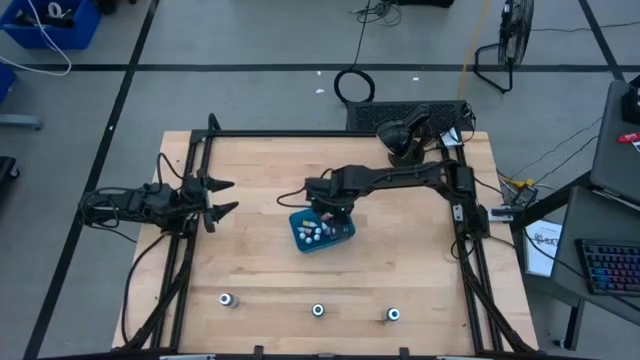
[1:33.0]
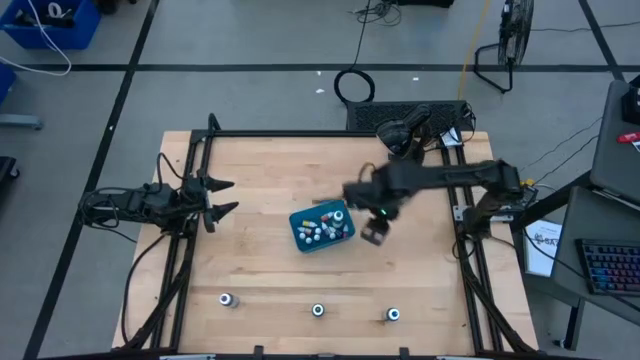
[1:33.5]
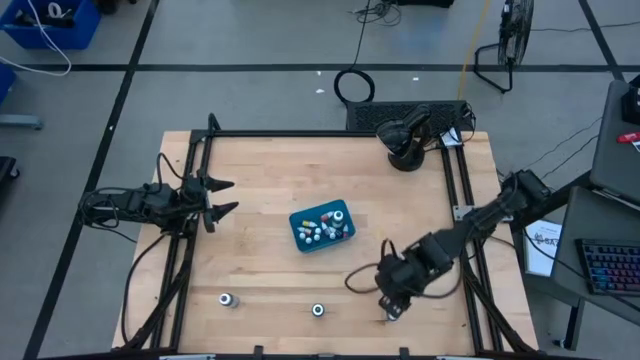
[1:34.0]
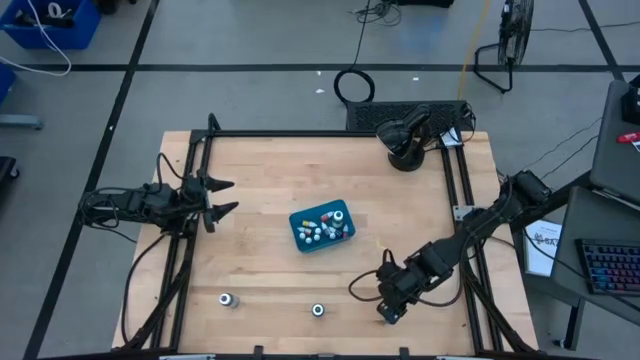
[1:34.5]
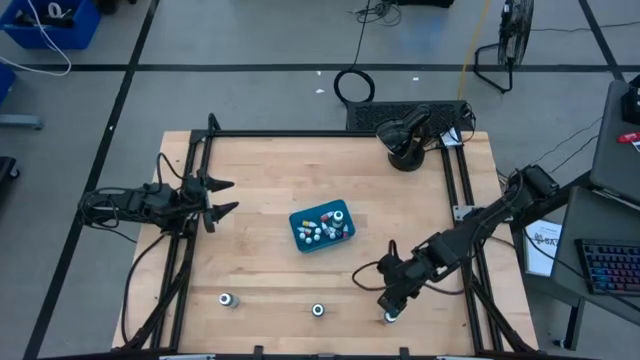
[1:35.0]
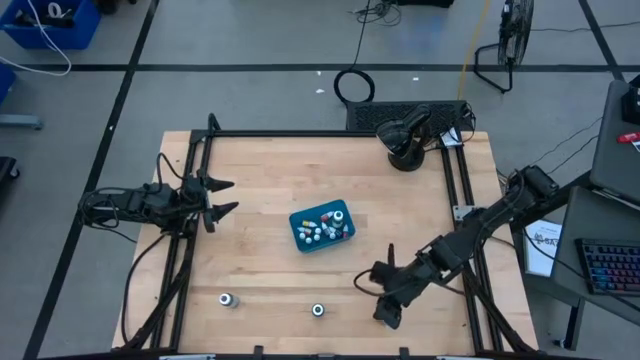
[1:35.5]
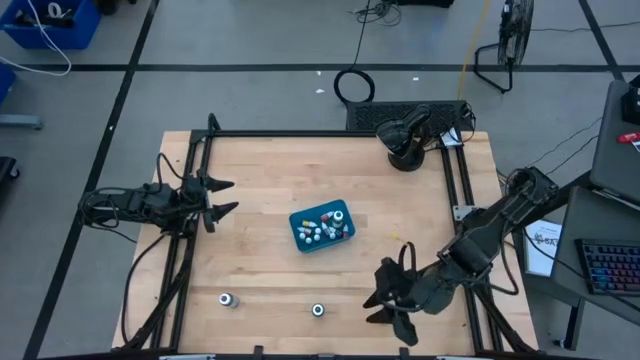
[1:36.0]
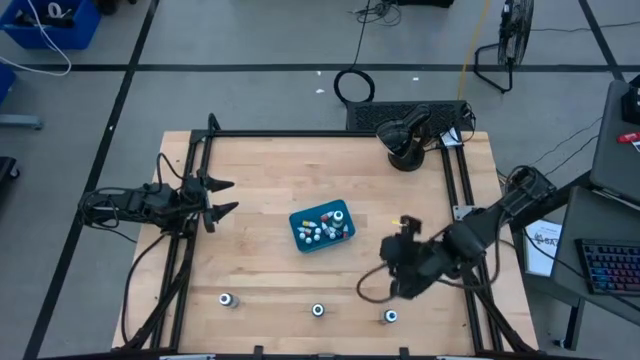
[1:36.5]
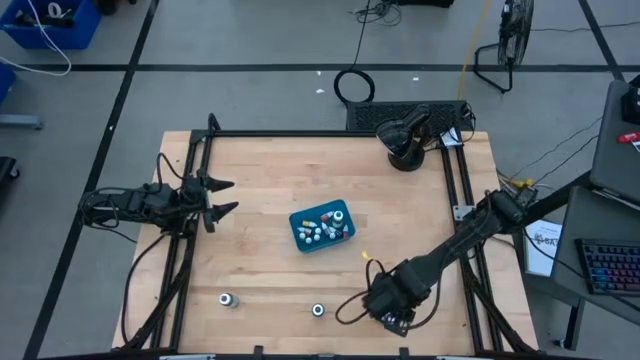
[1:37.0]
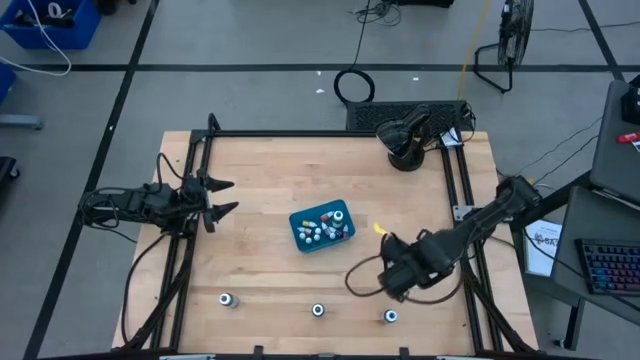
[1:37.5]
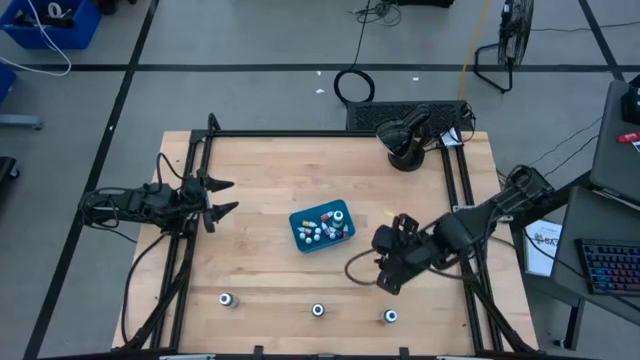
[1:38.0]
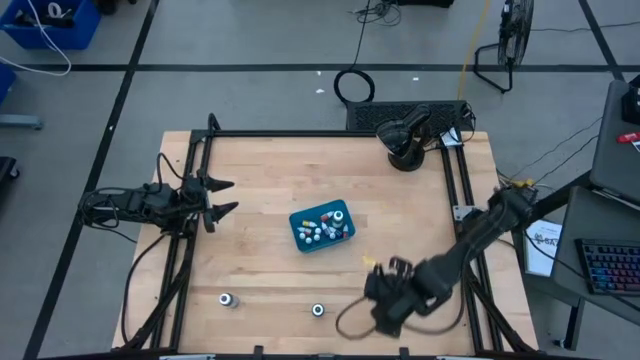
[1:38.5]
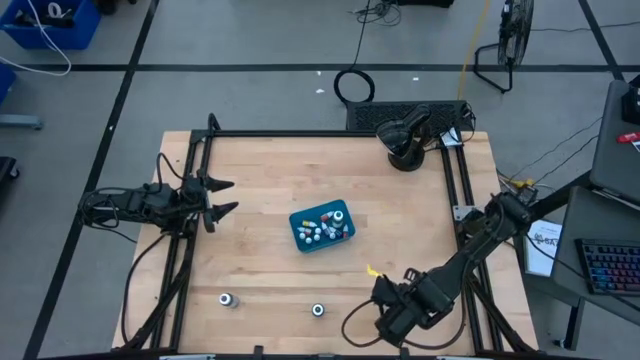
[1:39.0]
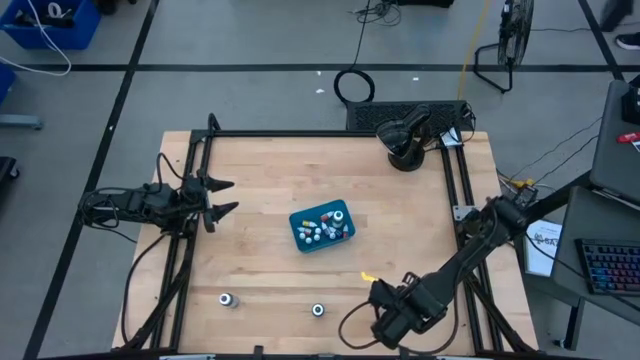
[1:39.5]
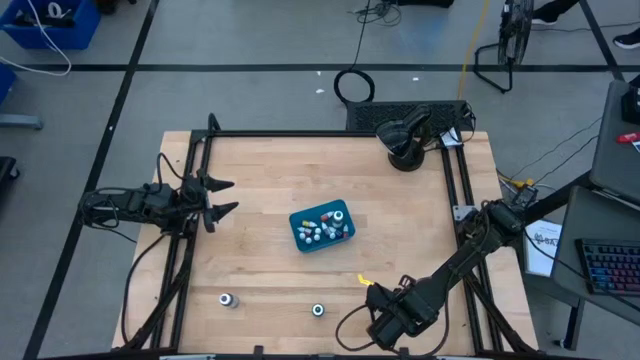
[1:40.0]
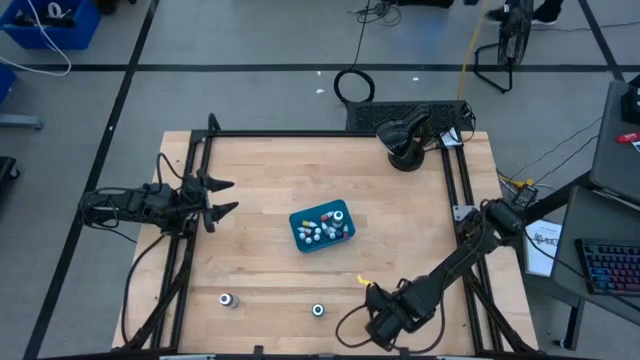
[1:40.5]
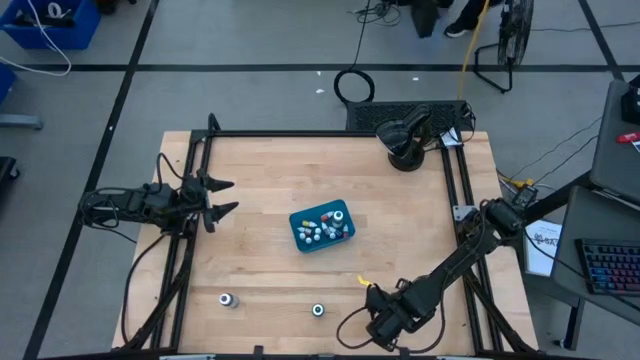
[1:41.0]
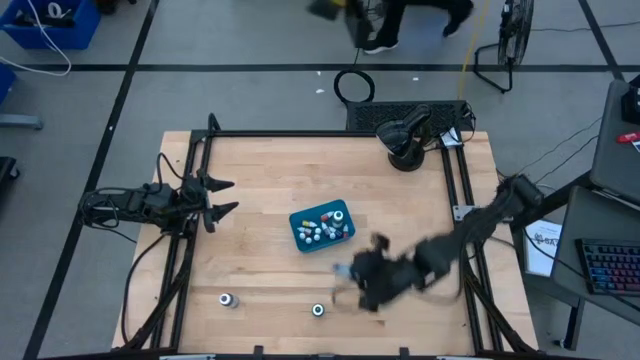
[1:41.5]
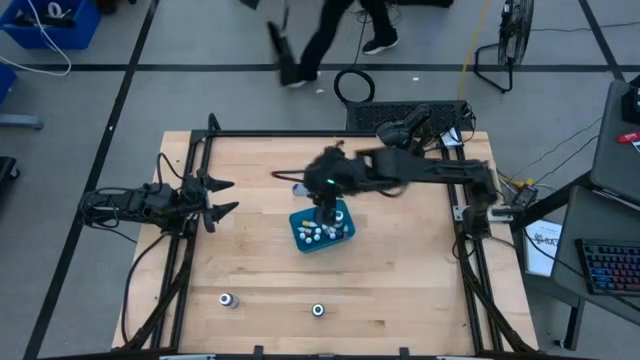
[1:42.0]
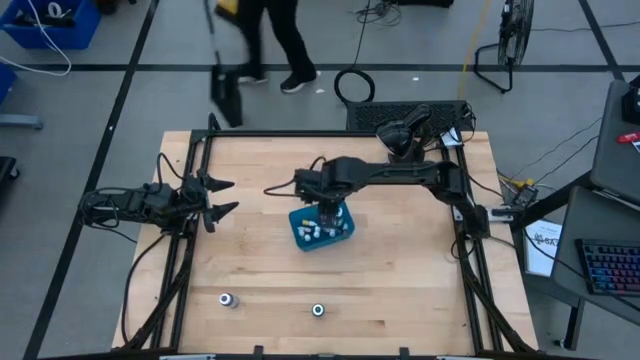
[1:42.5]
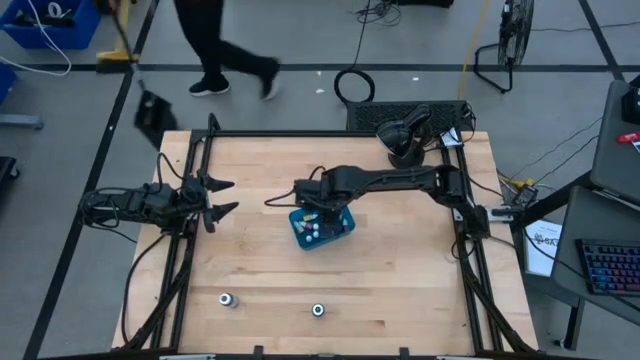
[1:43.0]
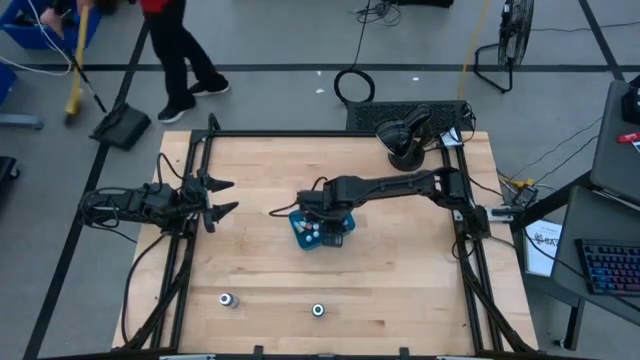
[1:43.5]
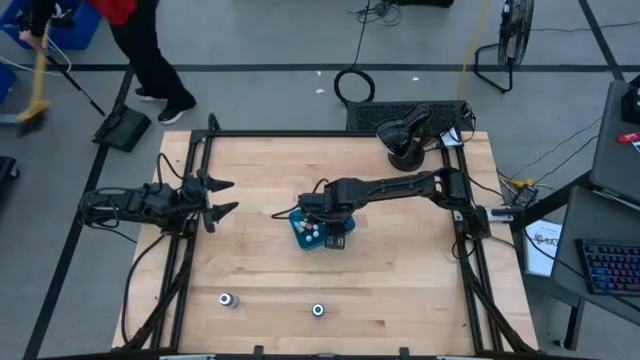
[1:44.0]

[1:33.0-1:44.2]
Task: Pick & Place food coloring
Put the blue food coloring bottle into the blue bin

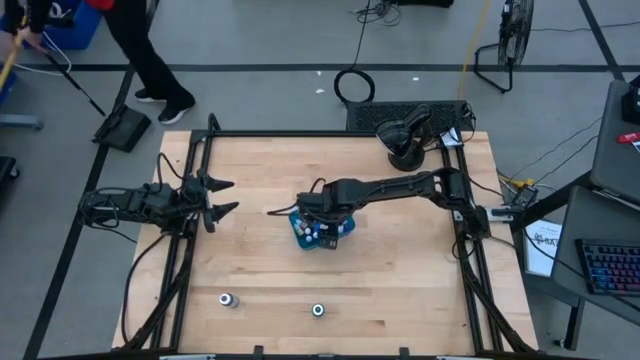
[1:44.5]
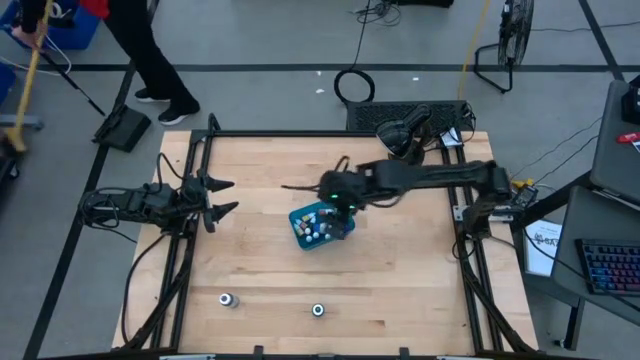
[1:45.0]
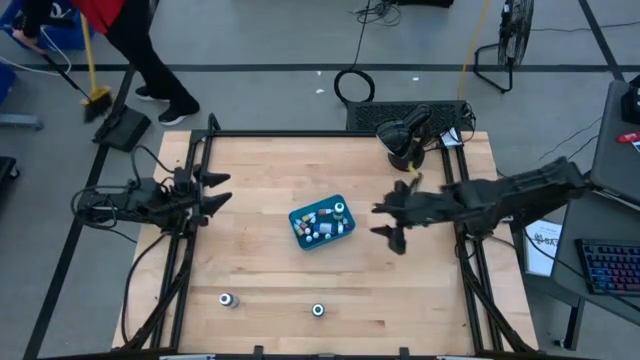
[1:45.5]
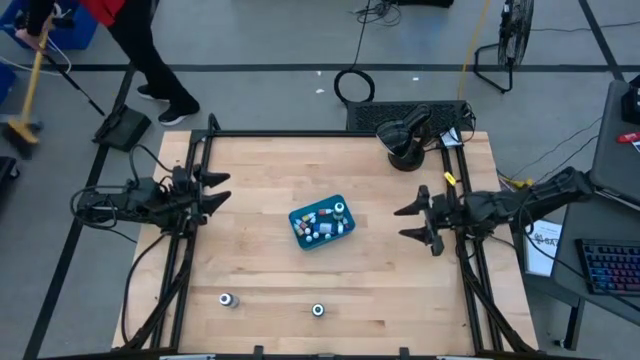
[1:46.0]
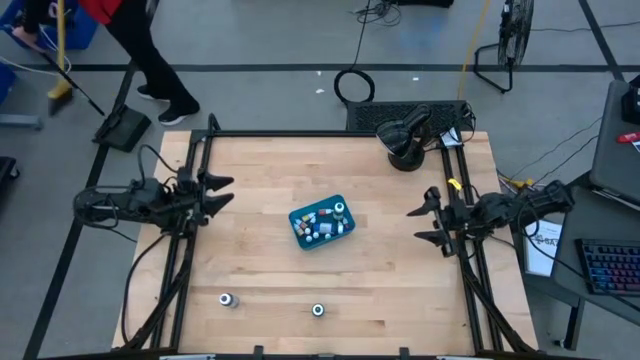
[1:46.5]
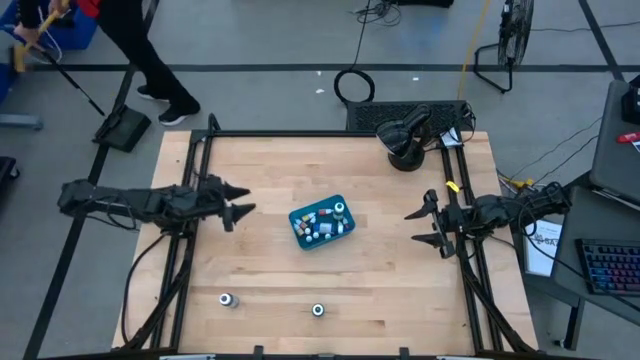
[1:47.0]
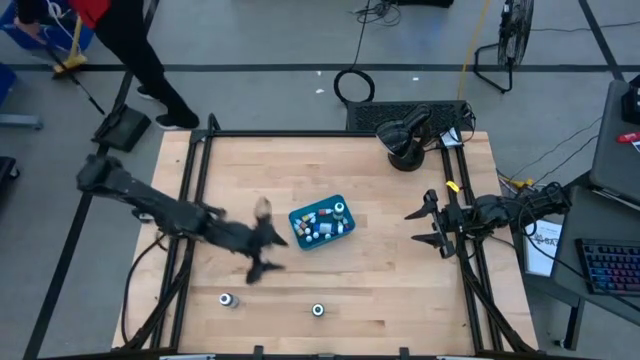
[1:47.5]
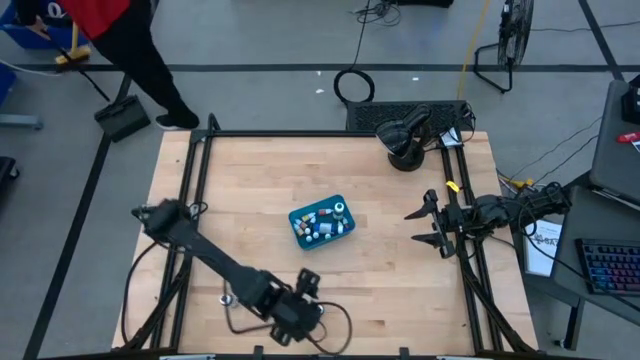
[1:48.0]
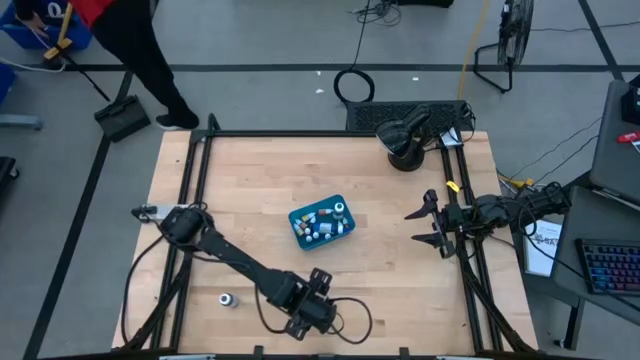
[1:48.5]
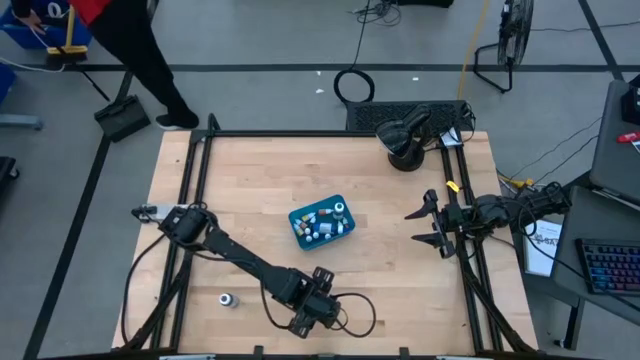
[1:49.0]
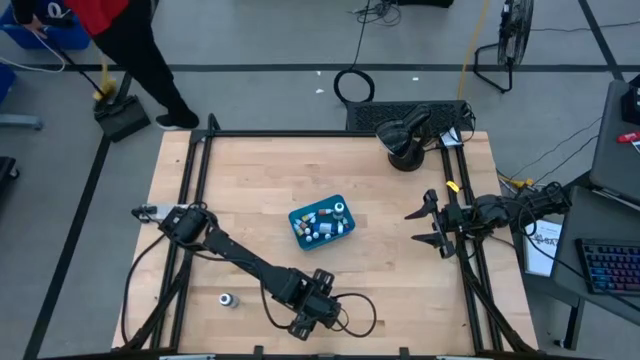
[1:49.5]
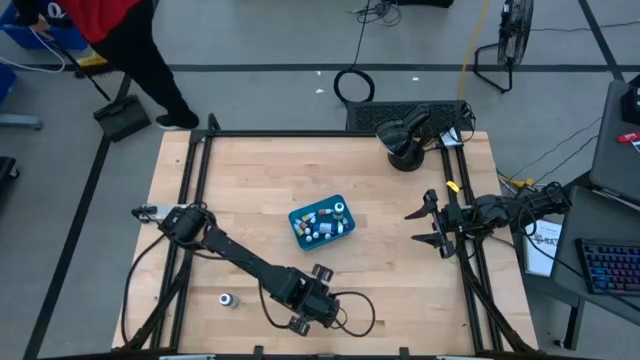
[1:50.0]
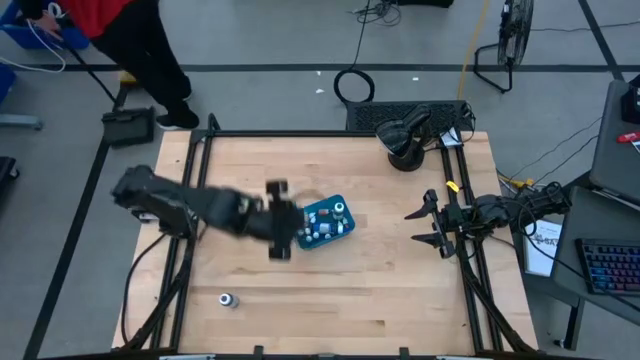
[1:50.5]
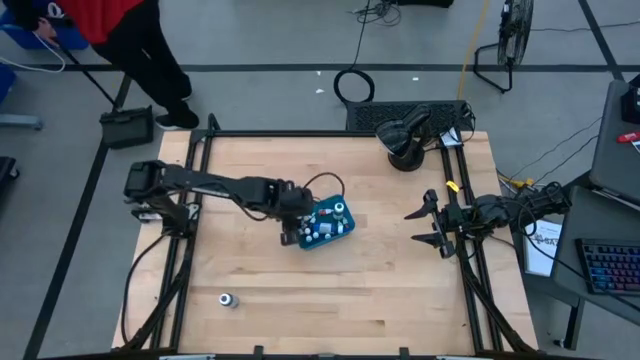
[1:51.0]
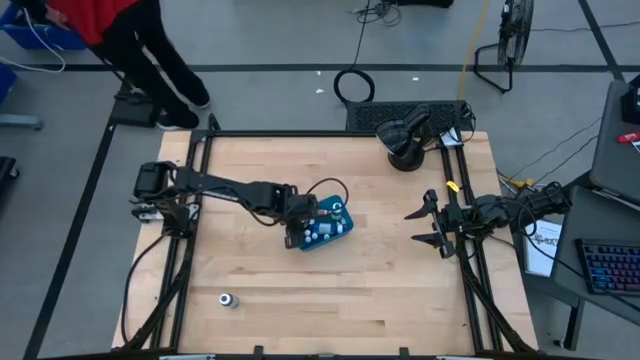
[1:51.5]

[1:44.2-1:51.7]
Put the black food coloring bottle into the blue bin

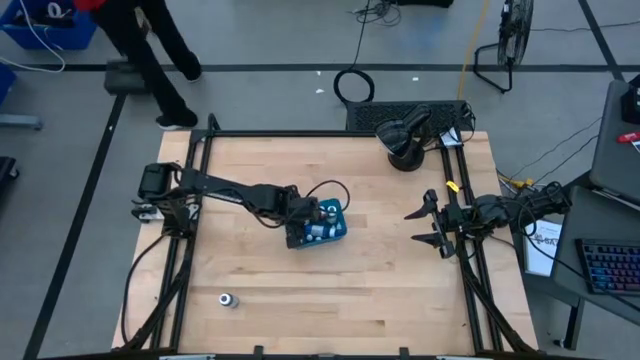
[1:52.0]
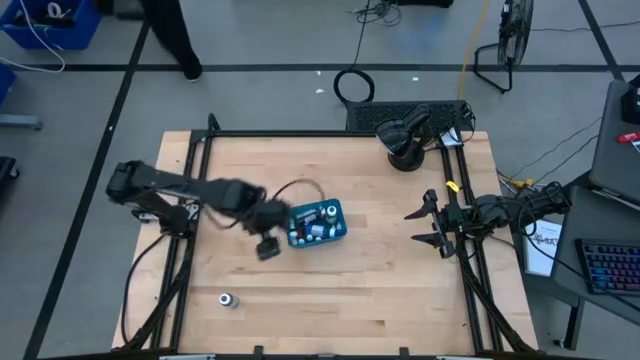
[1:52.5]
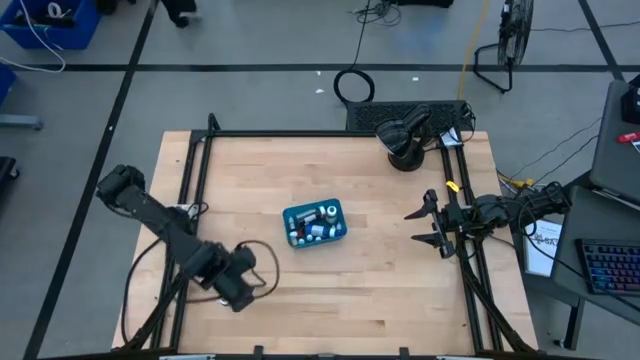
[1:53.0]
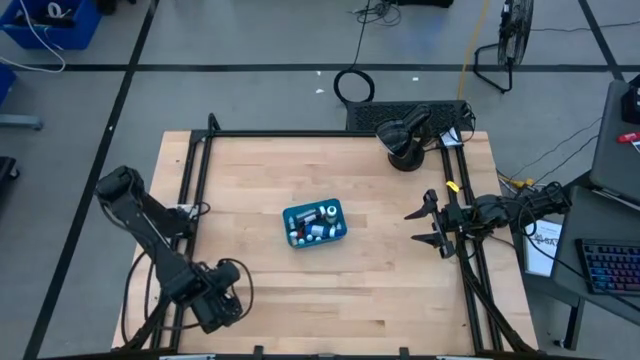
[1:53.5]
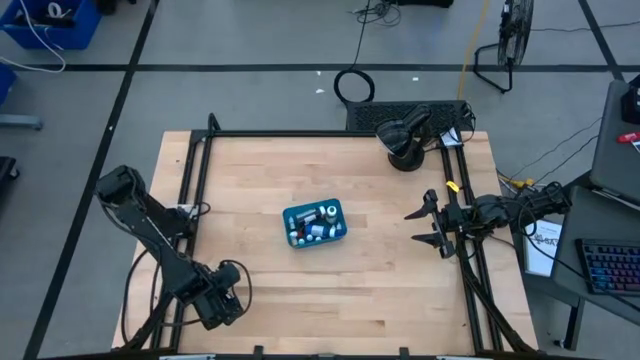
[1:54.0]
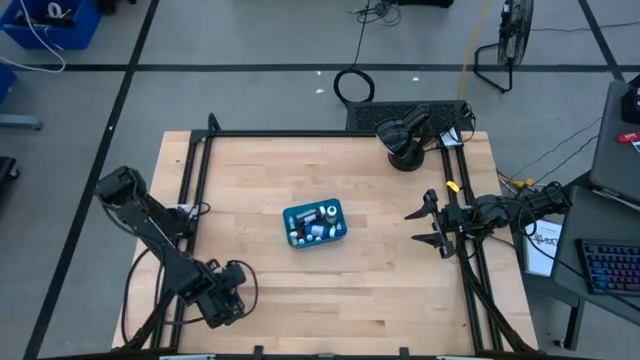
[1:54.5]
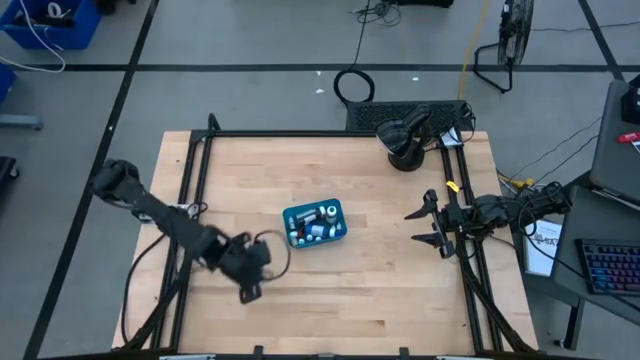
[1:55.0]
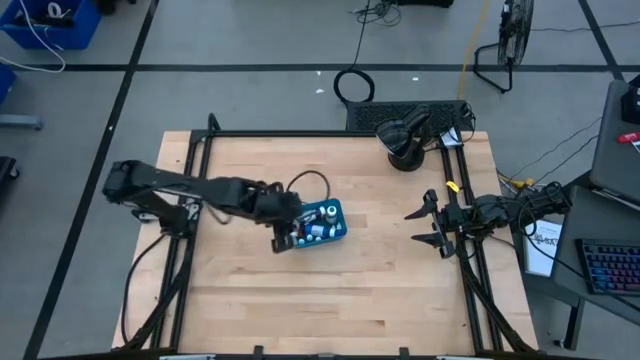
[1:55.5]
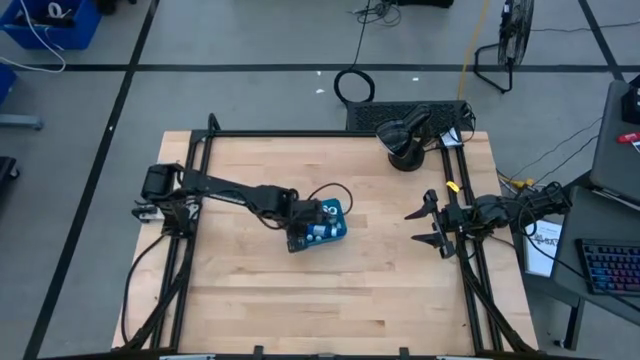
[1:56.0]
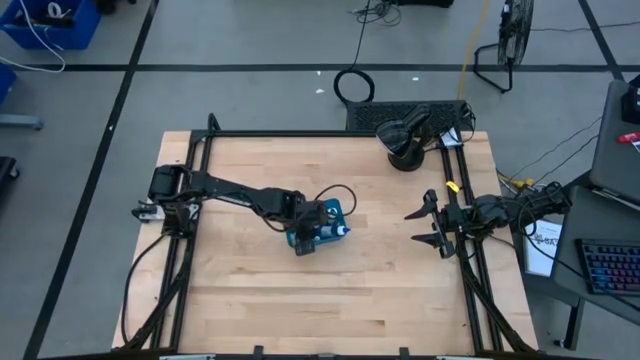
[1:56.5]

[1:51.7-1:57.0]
Put the purple food coloring bottle into the blue bin
